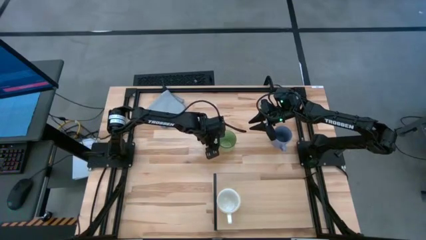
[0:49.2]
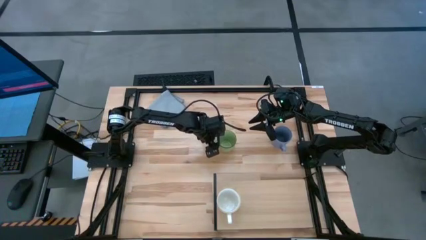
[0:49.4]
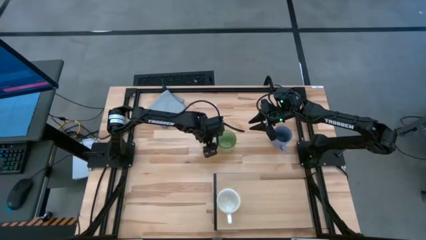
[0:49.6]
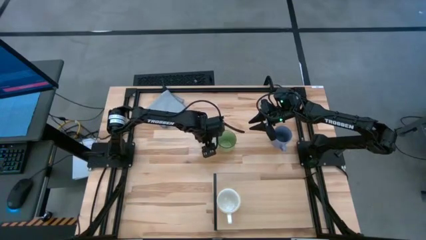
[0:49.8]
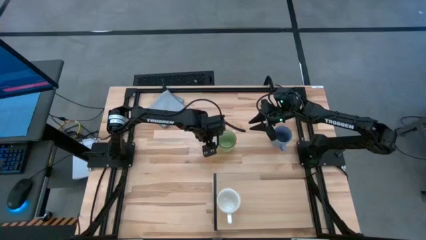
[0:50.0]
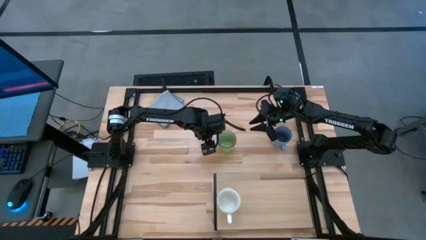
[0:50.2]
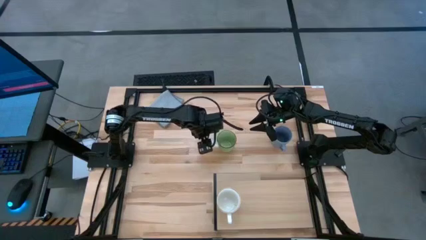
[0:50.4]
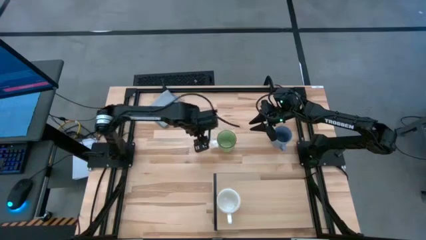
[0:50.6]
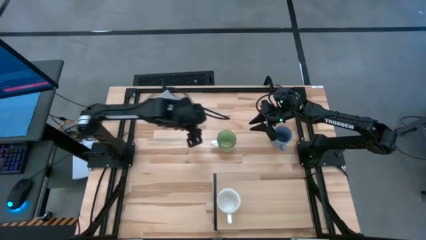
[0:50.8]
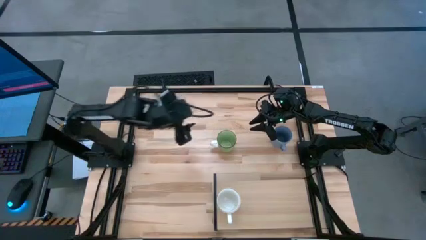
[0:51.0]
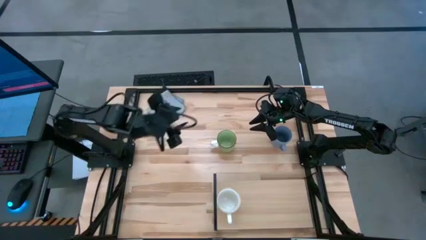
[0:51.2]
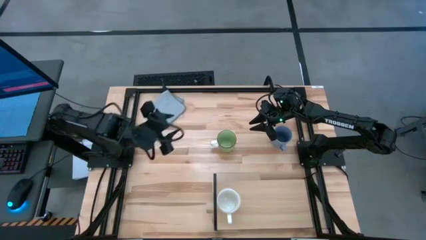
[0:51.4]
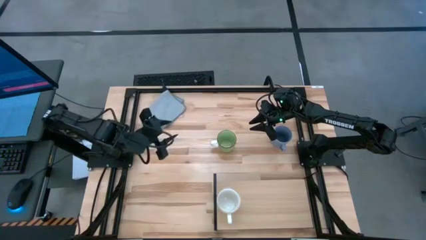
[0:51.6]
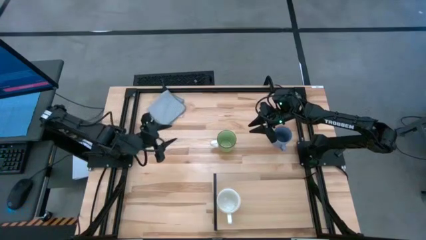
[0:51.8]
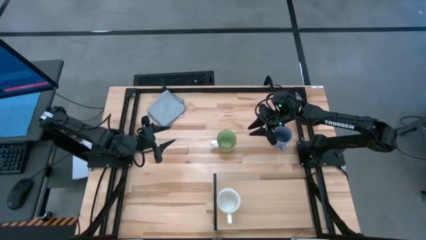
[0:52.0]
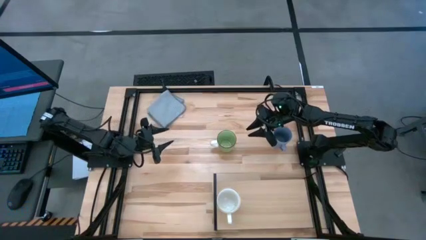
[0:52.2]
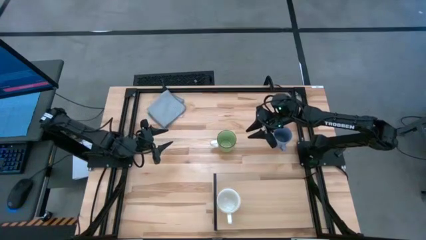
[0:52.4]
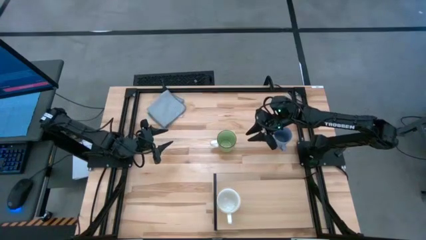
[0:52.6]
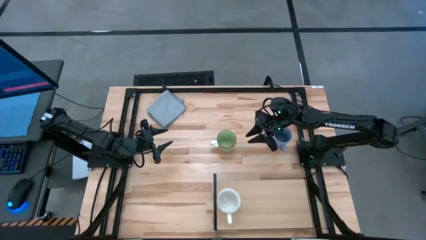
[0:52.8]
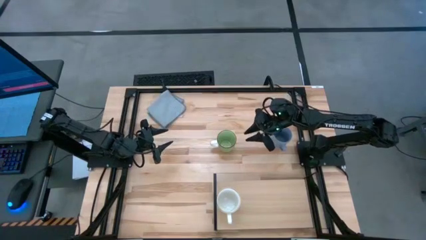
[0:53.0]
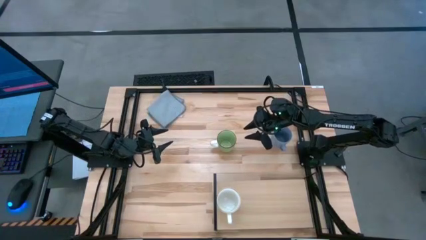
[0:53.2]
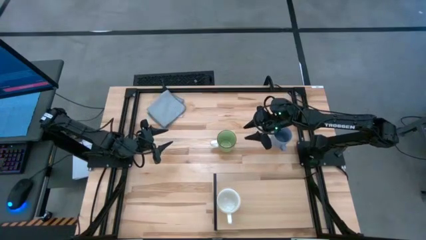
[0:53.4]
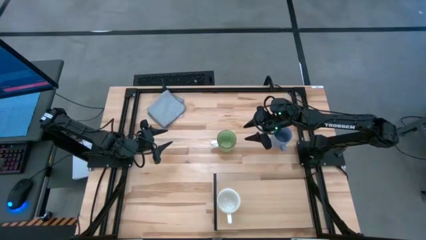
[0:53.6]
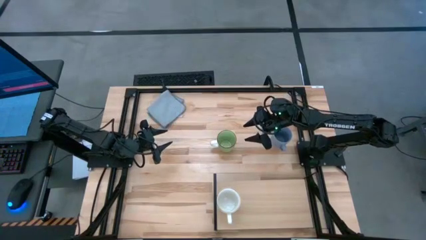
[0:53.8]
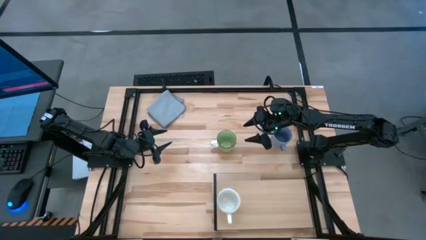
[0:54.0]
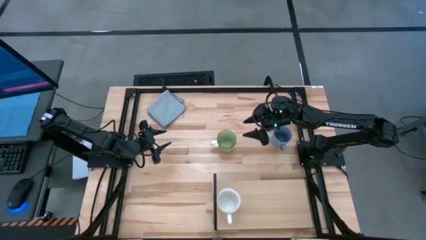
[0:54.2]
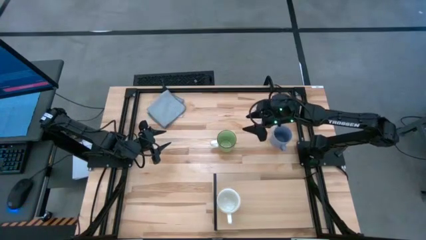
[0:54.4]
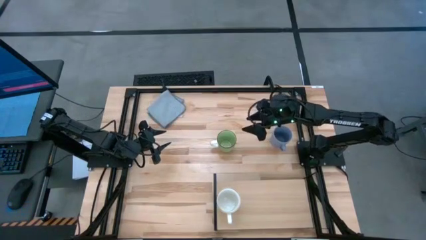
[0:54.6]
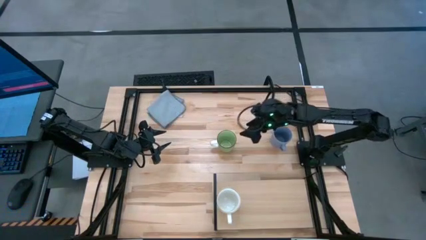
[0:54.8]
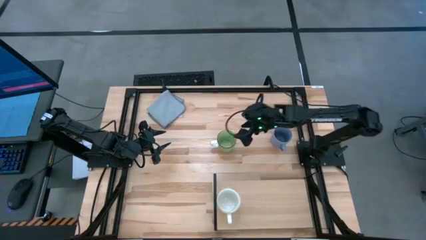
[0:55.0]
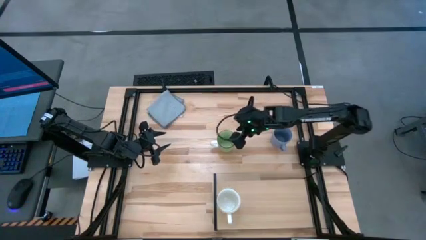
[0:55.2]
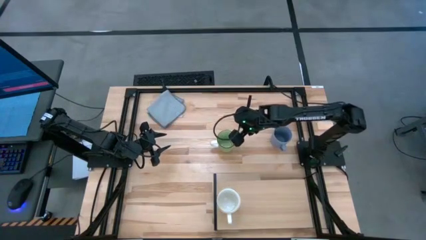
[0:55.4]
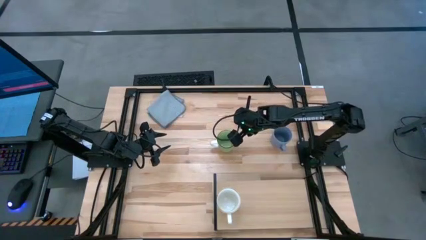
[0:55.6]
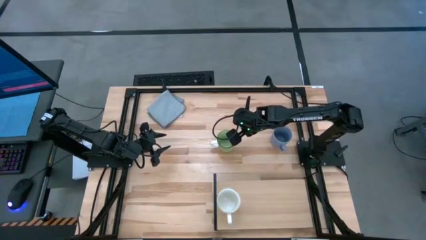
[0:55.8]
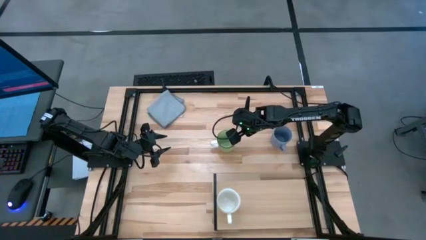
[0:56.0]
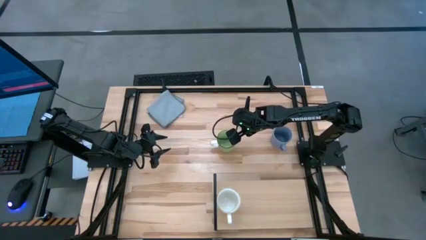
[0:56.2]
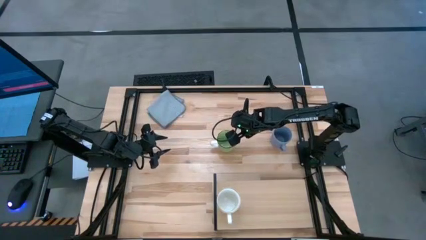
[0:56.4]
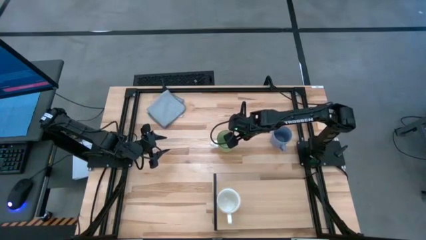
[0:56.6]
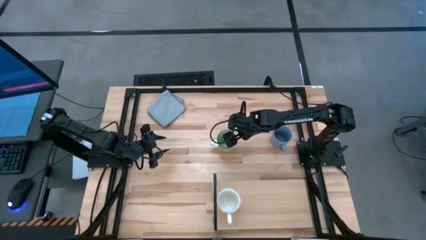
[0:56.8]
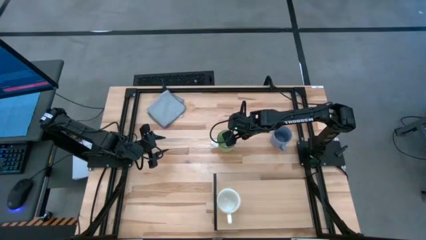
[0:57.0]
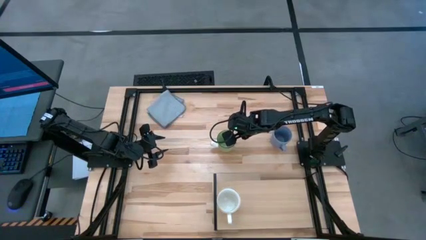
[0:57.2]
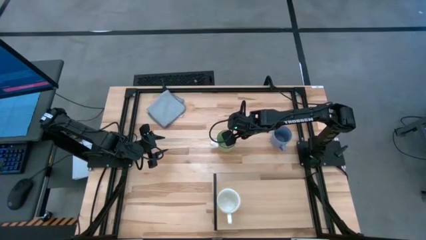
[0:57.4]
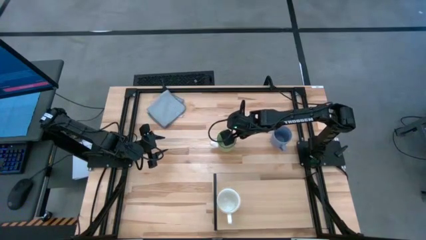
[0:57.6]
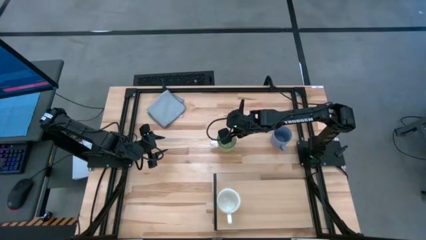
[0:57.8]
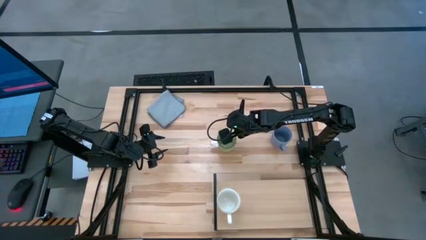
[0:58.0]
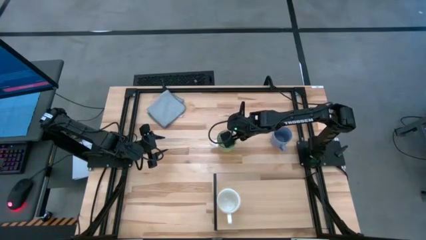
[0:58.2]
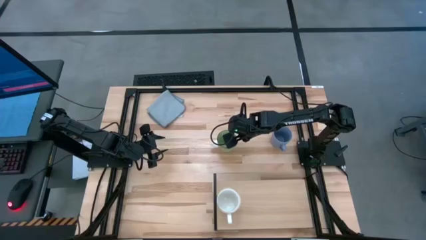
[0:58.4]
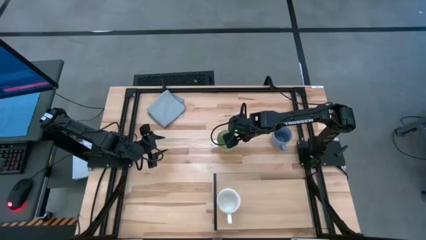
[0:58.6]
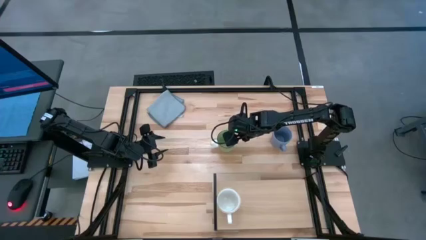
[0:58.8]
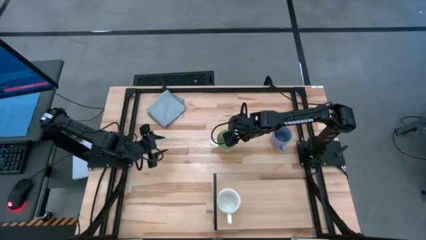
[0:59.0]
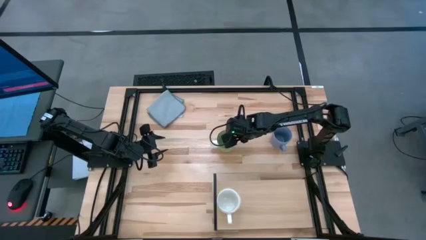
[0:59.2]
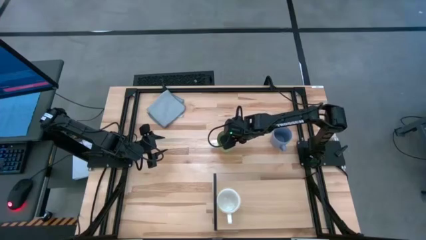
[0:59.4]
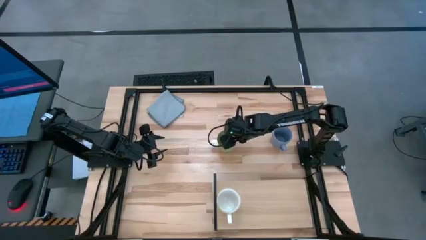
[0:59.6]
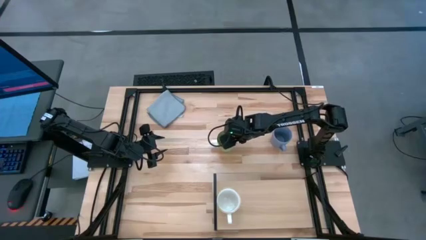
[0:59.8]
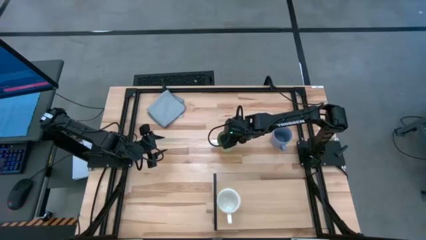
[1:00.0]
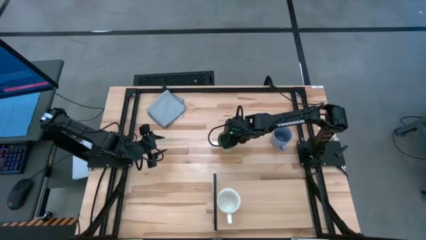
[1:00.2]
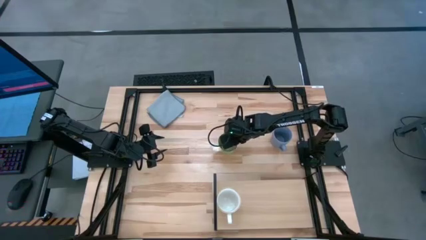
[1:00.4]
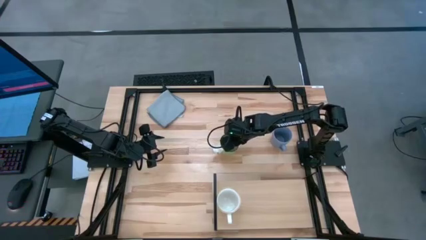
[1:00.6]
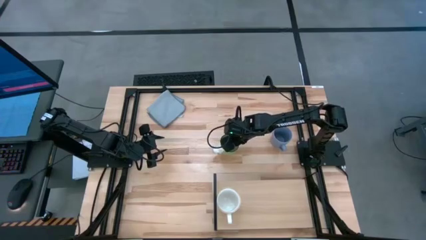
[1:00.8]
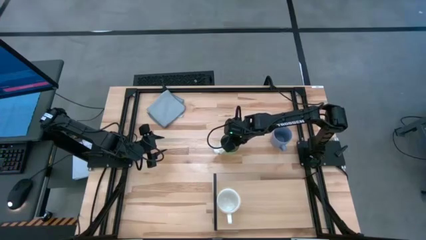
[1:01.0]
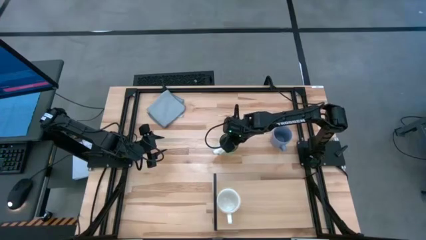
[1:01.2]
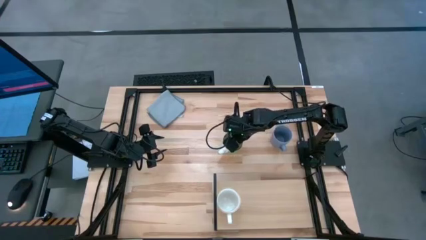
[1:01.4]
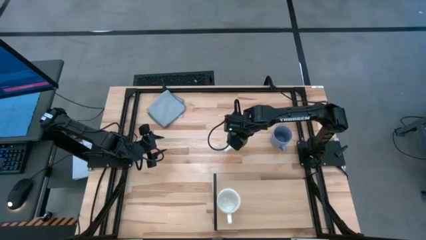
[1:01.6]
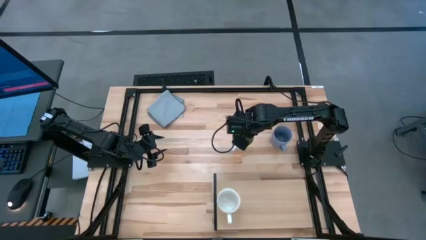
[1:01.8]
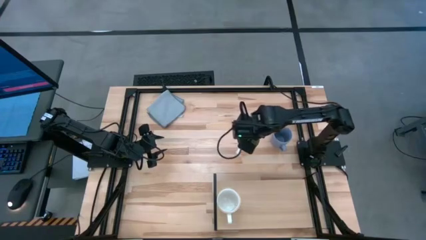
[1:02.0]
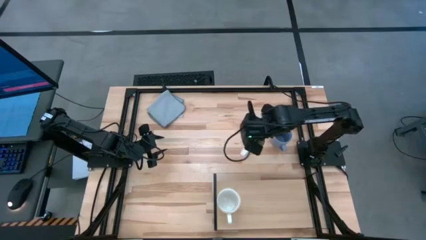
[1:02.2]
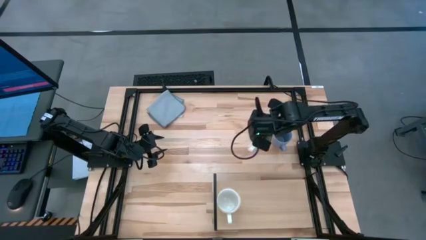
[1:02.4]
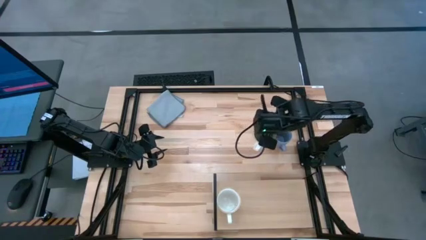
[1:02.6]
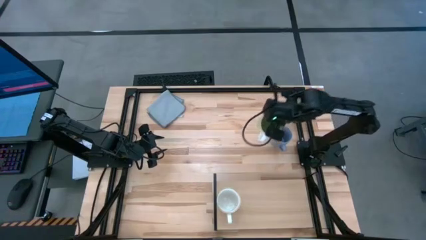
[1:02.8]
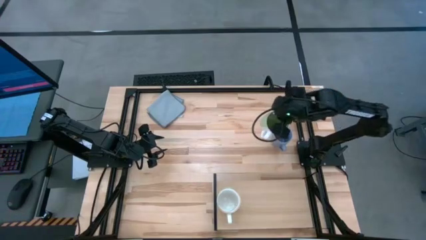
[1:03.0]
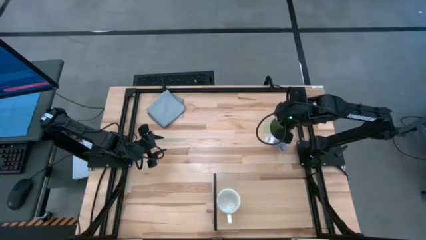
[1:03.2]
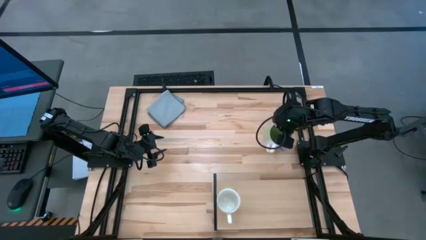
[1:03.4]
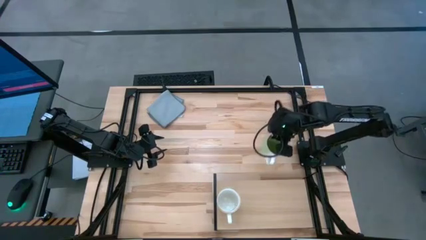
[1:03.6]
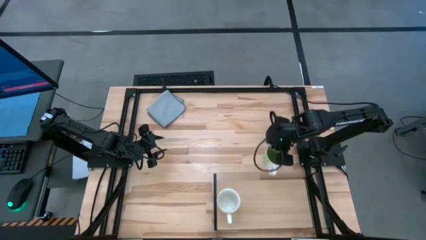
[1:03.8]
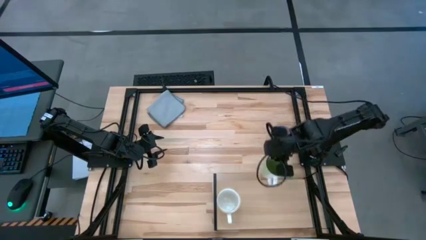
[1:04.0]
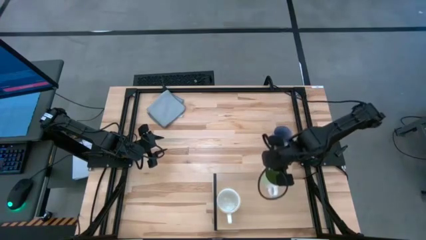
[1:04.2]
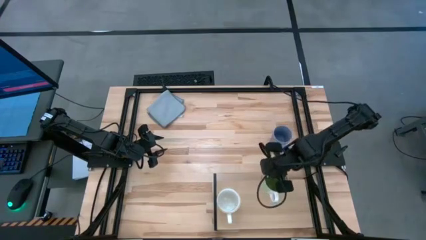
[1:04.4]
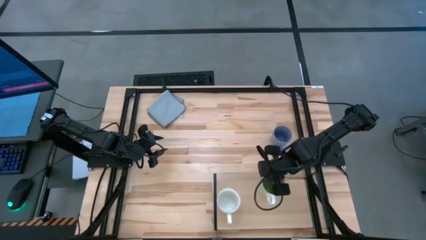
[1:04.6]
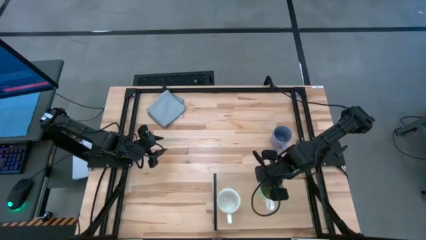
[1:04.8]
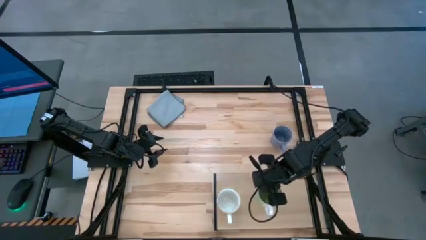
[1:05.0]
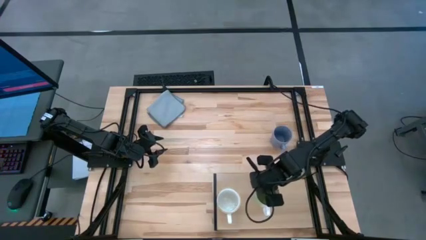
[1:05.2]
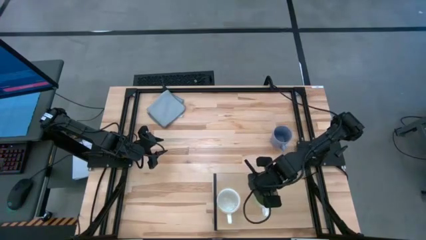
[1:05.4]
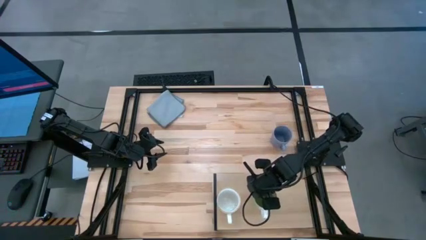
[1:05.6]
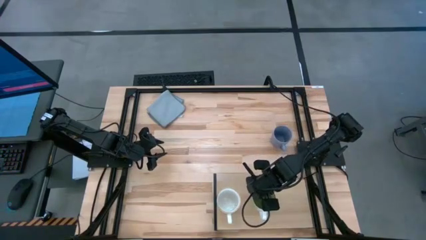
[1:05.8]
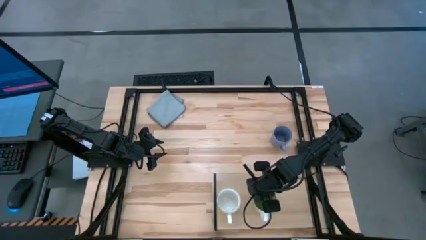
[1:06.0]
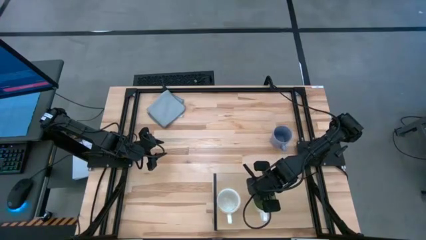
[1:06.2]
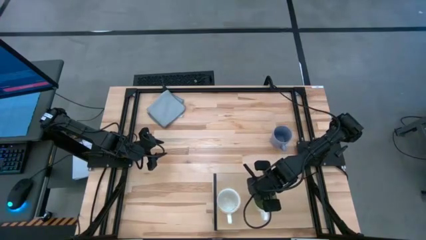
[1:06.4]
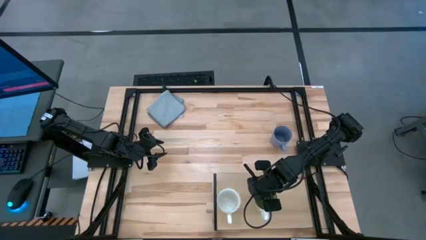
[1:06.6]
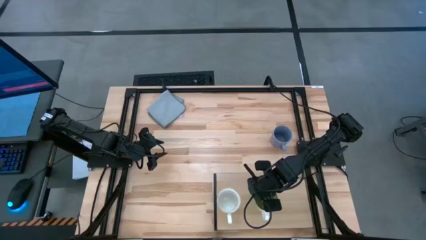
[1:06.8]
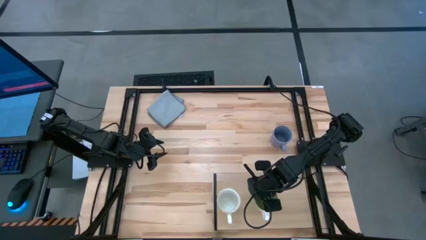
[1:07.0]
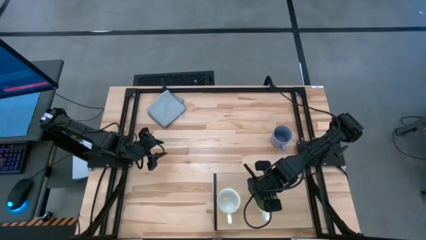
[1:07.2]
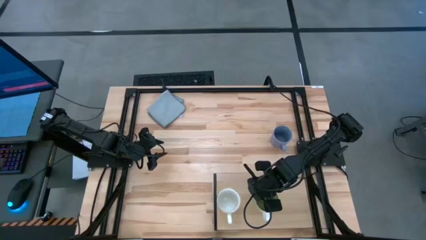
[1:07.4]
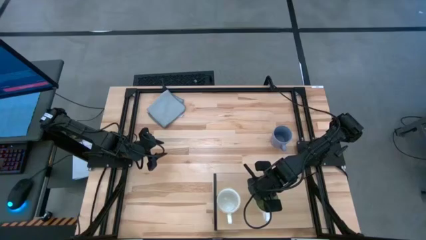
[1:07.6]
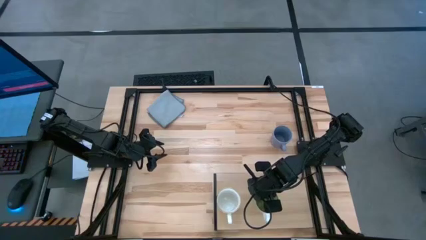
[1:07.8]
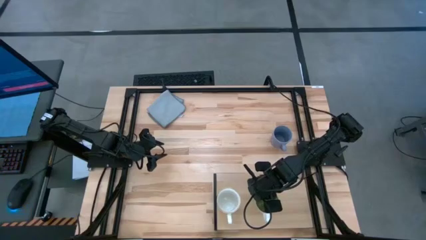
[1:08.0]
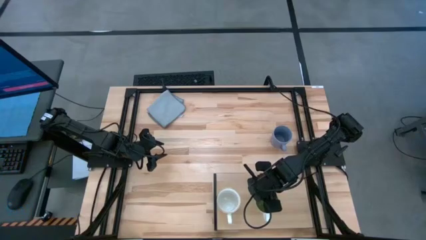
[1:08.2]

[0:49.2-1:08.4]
Task: Stack small to large cups/mugs on shelf
Put the green cup on the table
